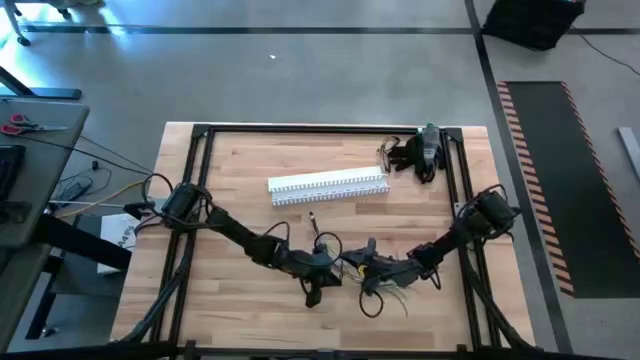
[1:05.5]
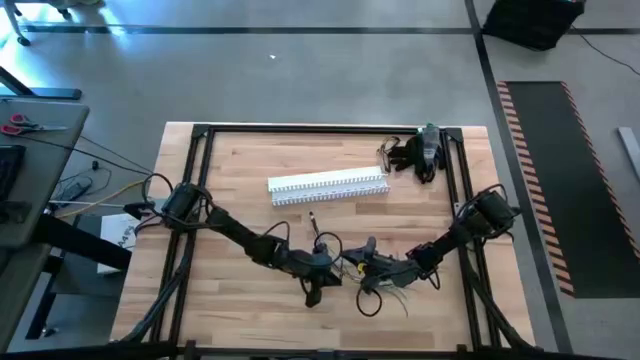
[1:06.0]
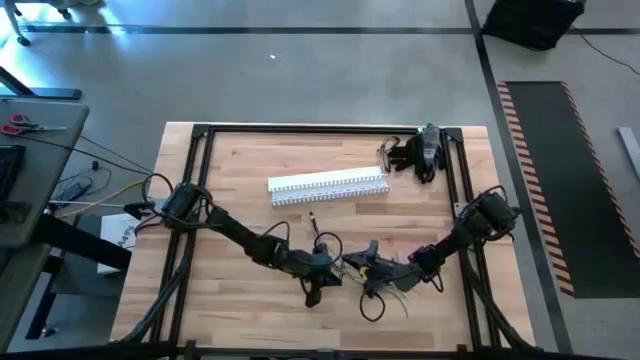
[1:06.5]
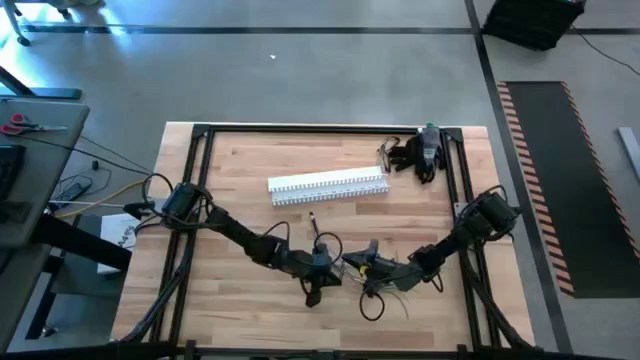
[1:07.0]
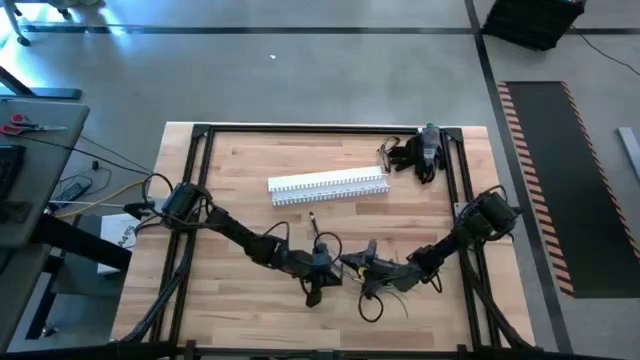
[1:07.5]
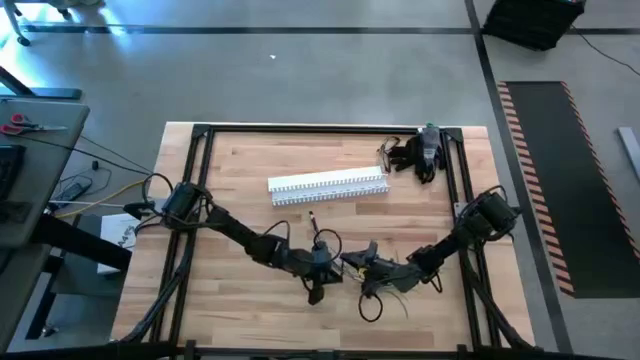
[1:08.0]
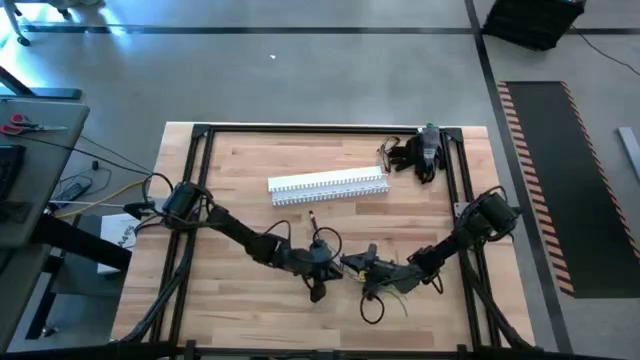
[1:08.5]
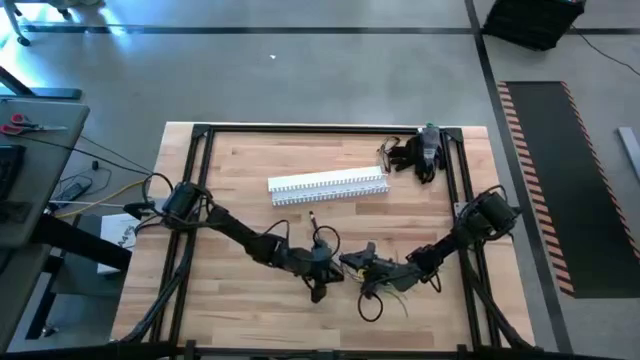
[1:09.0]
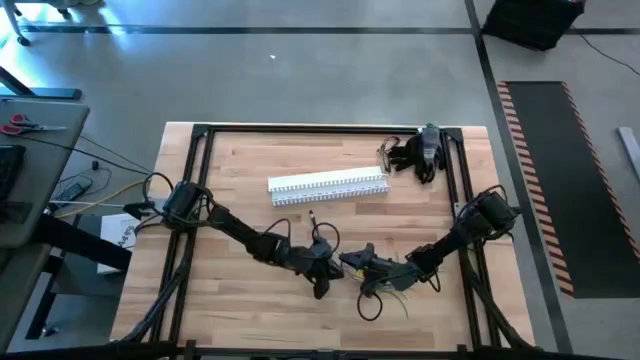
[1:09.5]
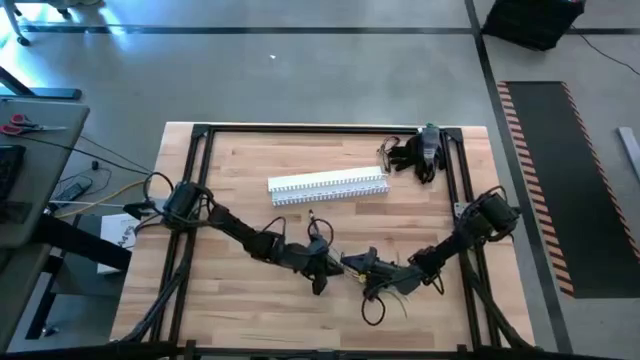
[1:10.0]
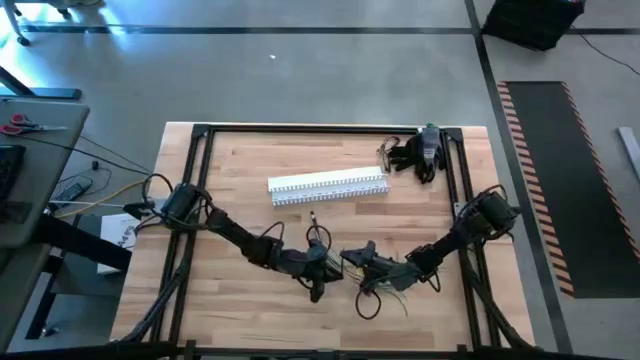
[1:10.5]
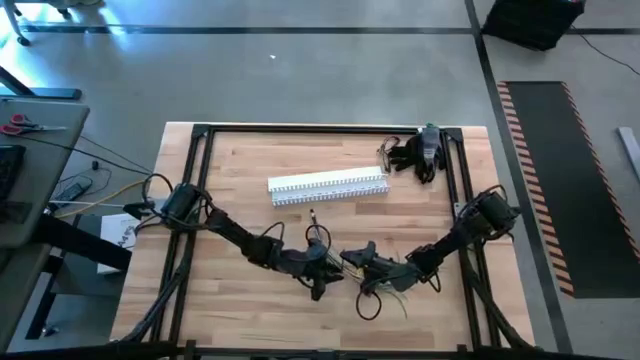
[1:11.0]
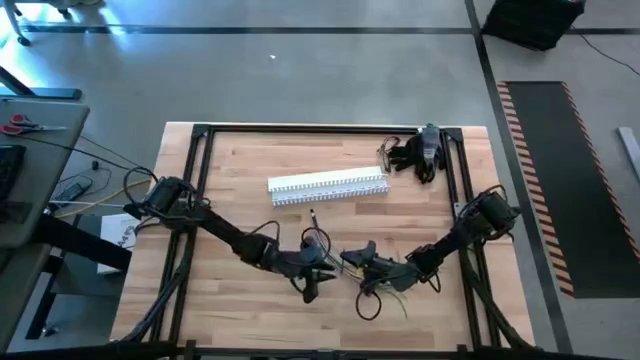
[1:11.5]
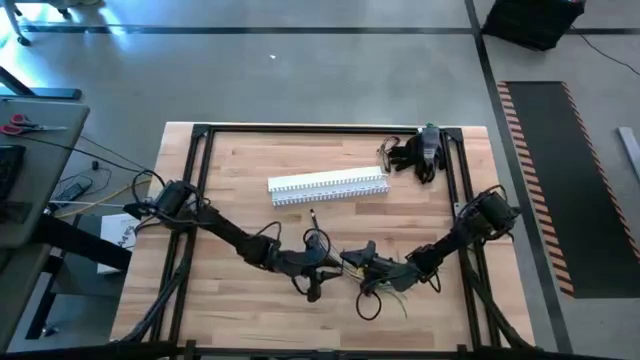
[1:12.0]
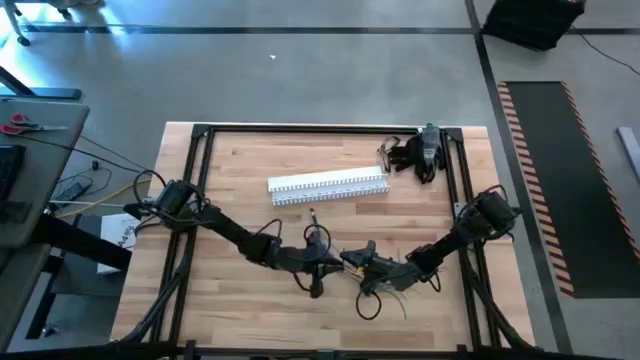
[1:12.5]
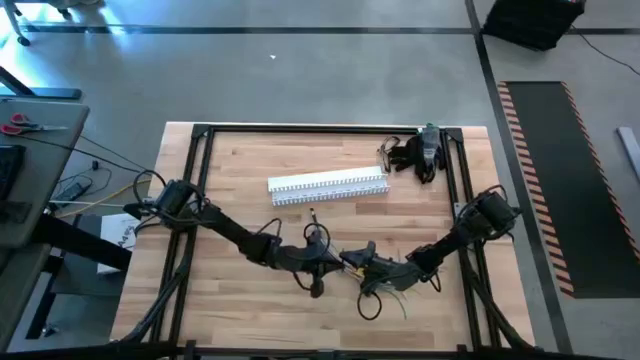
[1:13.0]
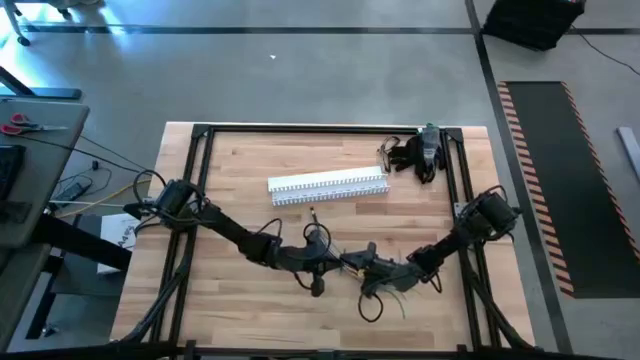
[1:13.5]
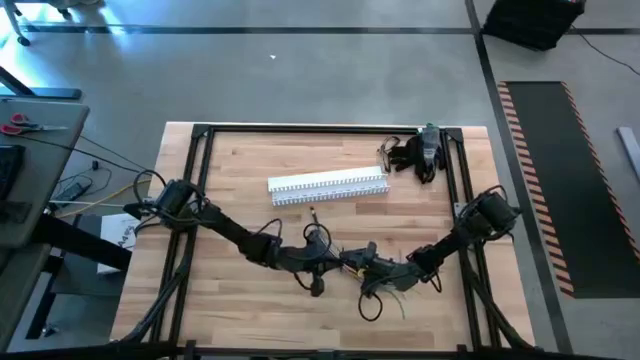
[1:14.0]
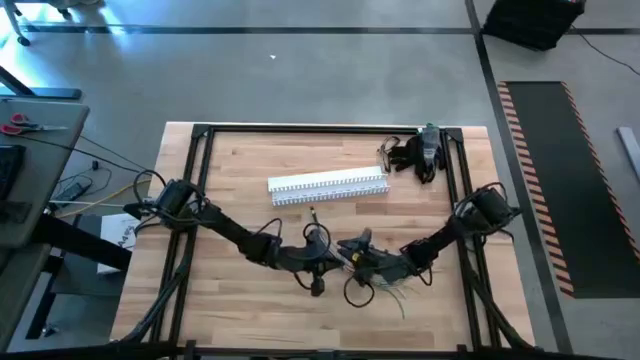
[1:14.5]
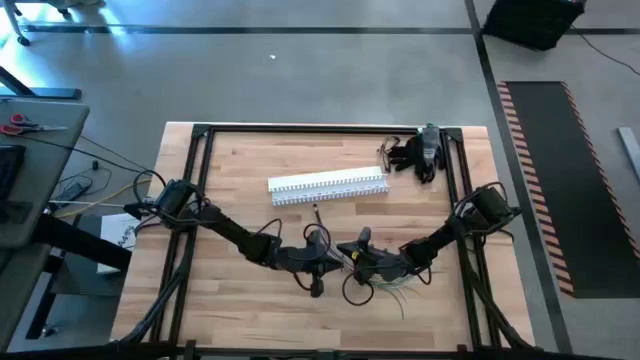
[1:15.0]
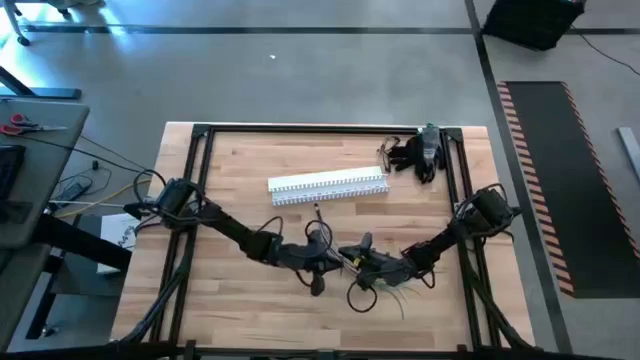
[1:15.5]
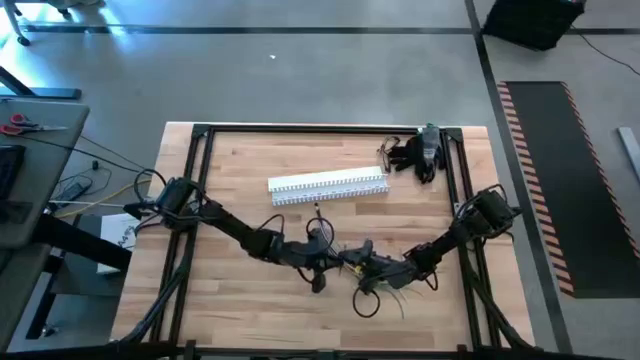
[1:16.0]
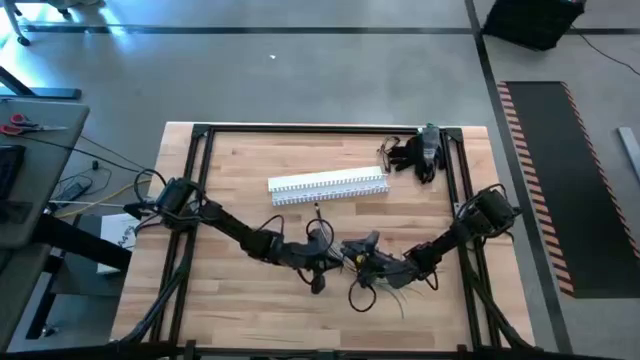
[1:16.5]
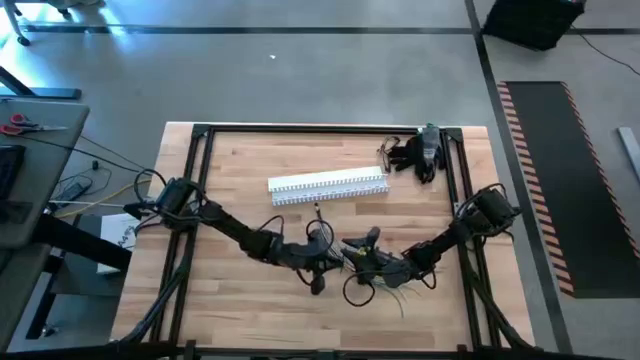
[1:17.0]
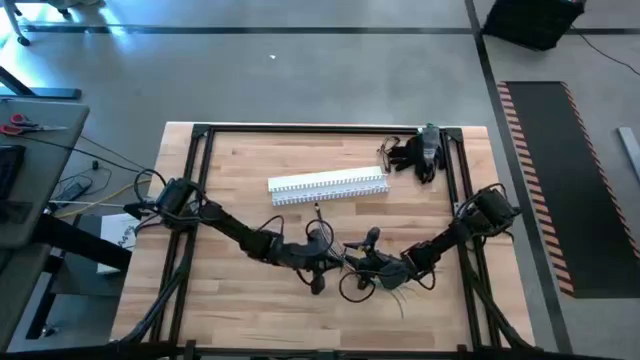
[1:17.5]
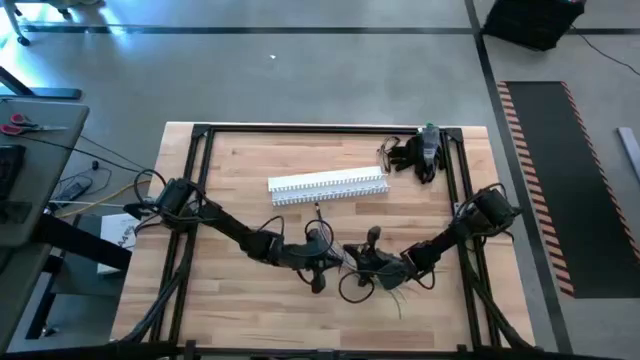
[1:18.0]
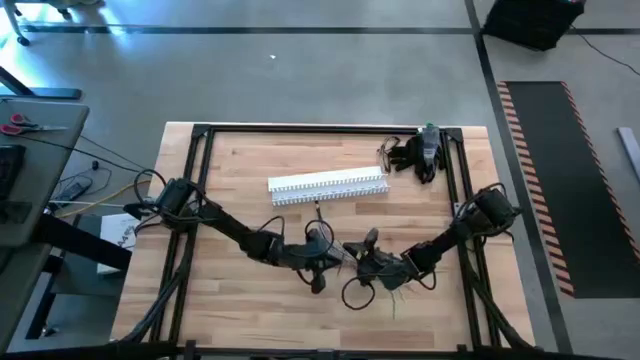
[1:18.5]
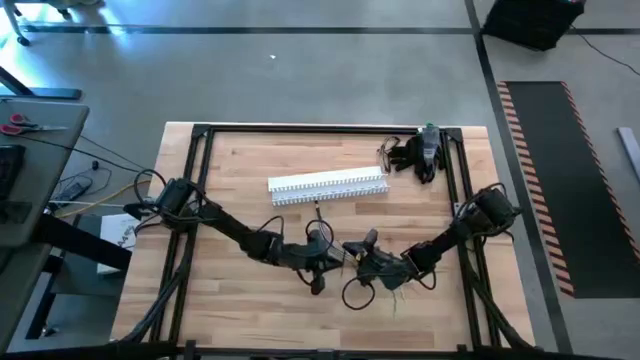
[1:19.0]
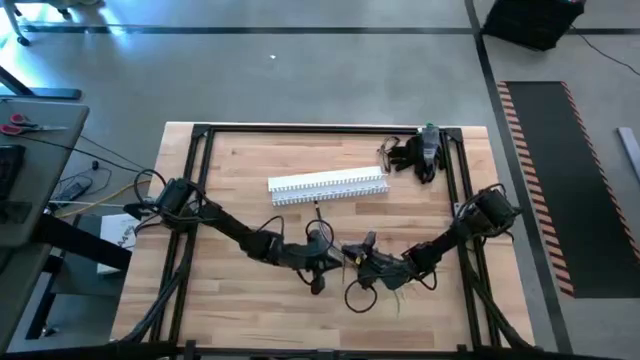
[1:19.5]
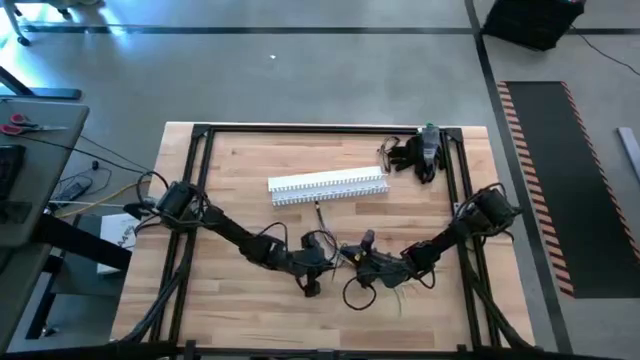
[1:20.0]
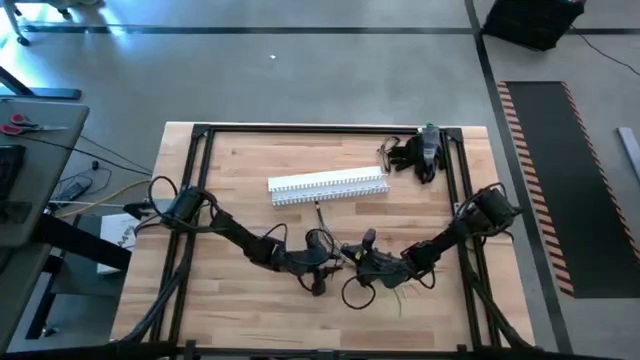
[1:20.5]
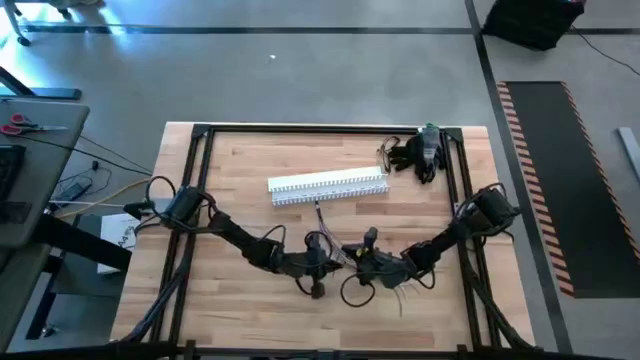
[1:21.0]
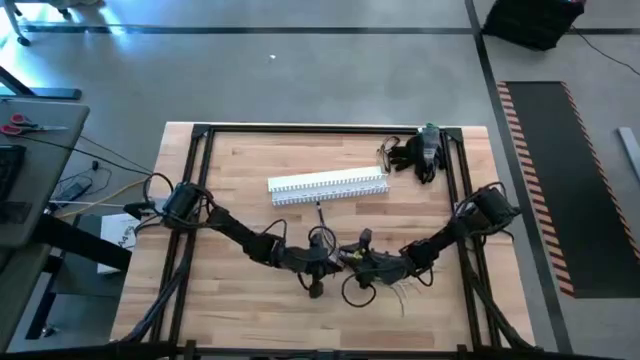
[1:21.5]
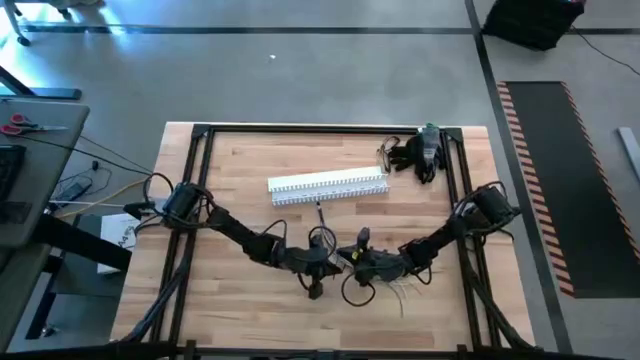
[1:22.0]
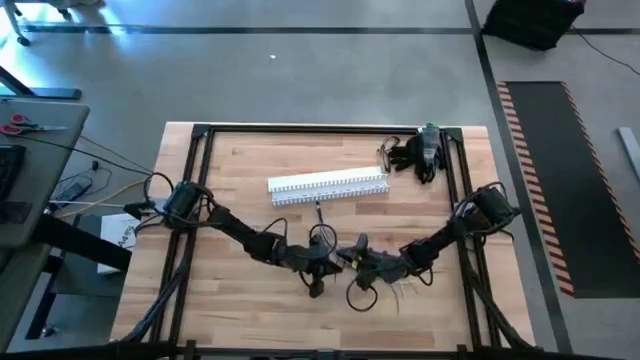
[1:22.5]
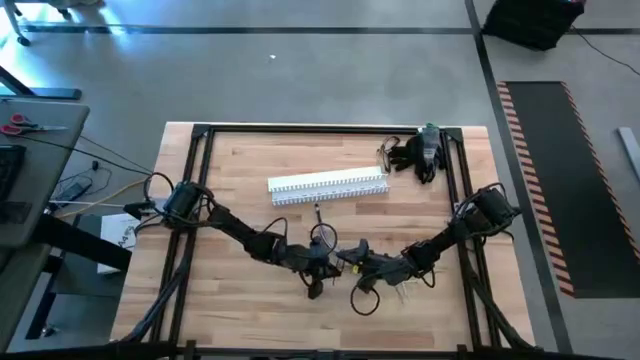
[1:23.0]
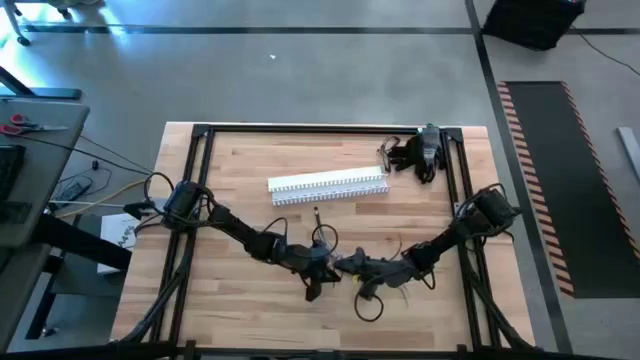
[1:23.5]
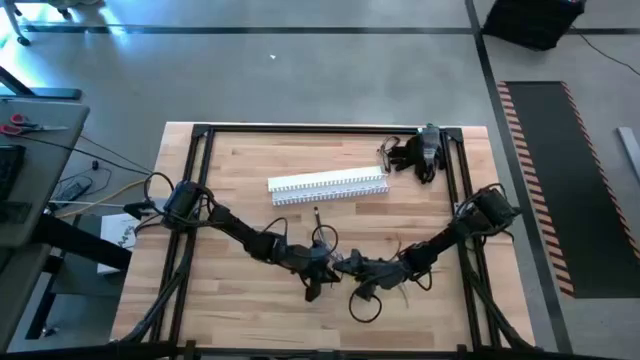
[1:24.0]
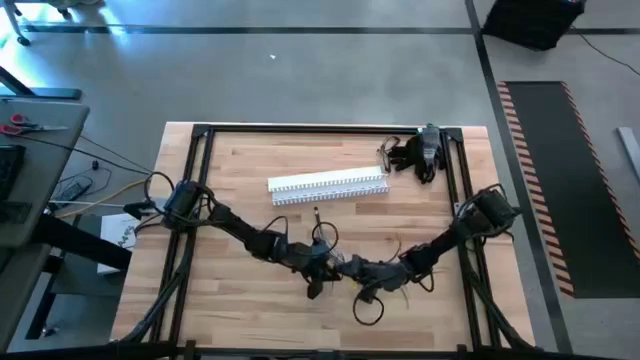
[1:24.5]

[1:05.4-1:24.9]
Task: Ziptie cables
Wrap the cable wires with black ziptie

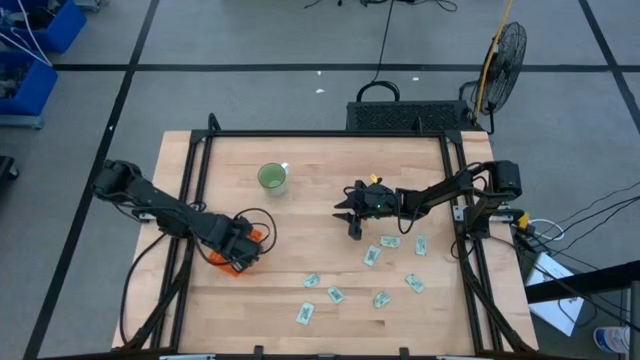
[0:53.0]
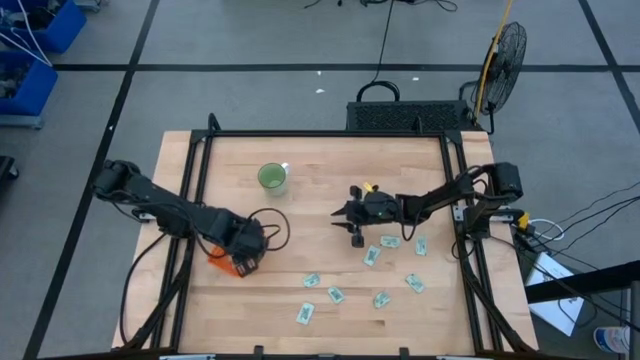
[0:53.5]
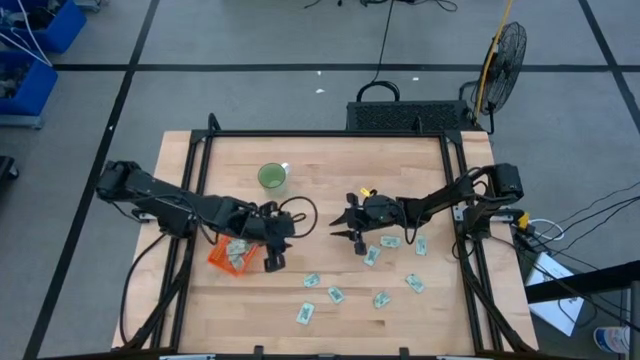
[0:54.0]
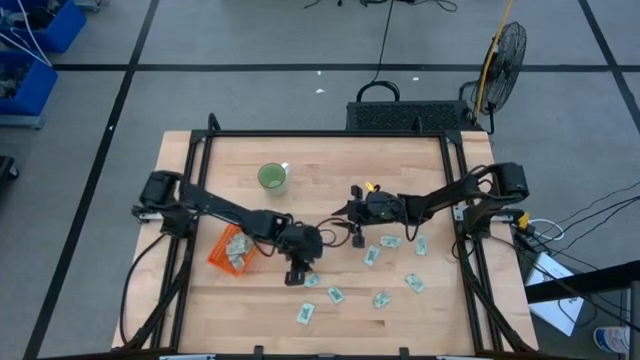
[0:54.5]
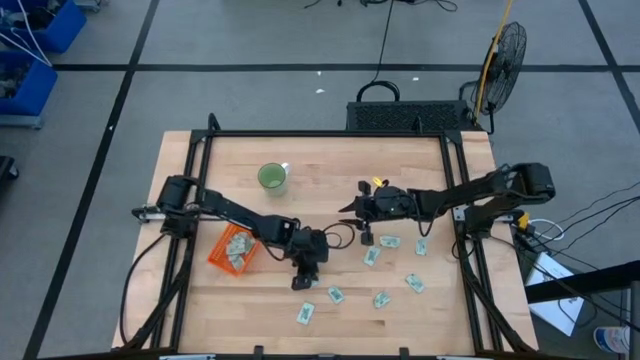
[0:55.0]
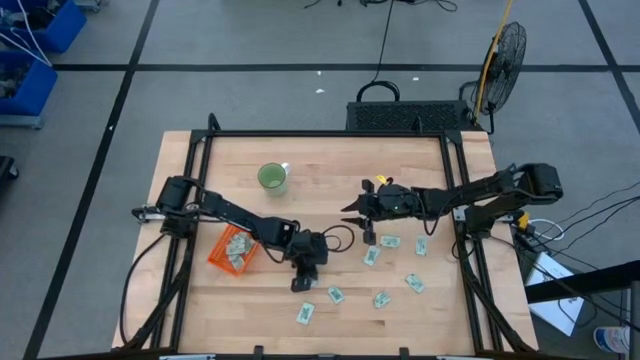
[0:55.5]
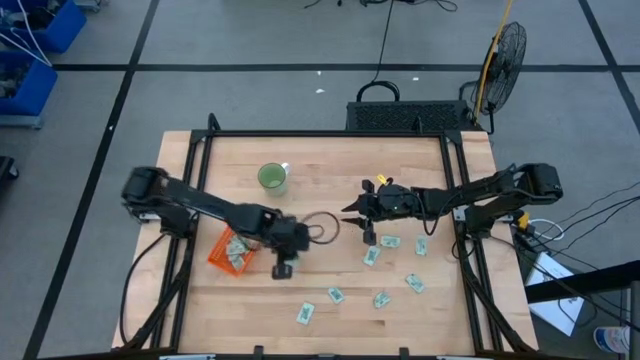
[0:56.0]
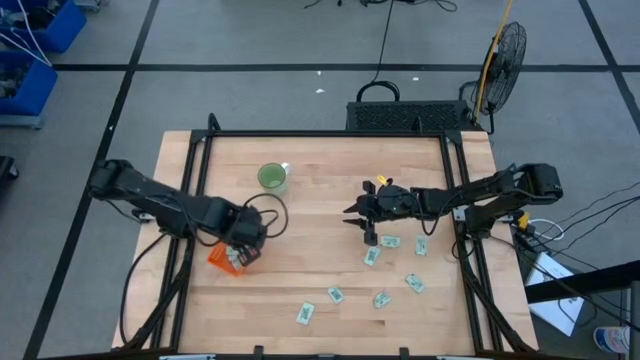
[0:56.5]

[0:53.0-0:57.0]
Task: Pick and place Stevia / Truvia into bins
Put the stevia packet into the orange bin
